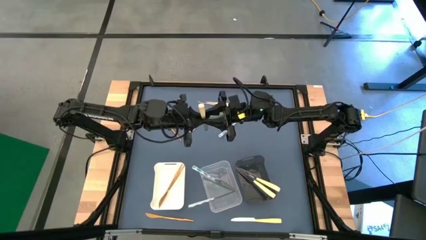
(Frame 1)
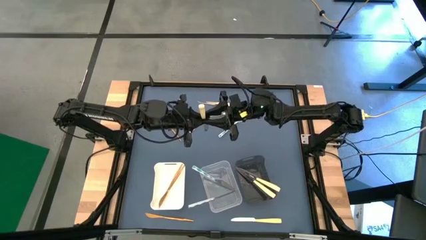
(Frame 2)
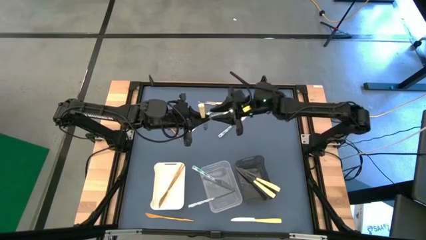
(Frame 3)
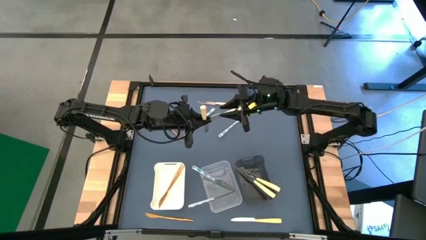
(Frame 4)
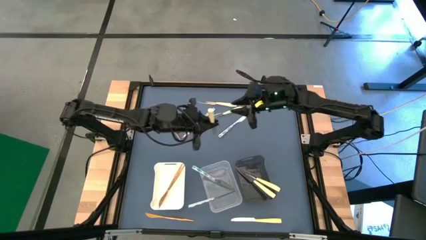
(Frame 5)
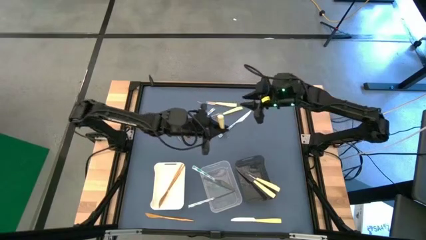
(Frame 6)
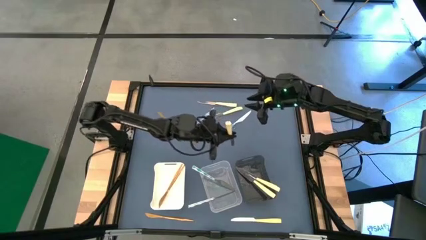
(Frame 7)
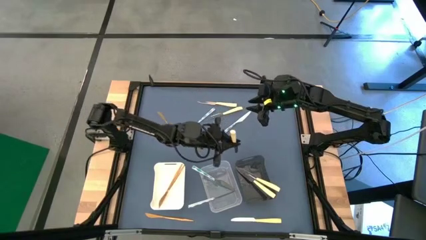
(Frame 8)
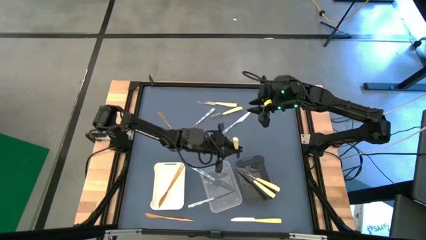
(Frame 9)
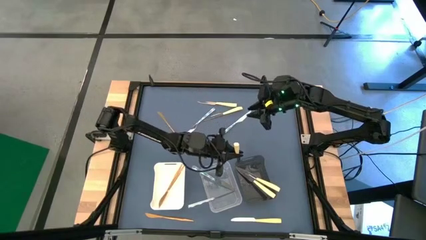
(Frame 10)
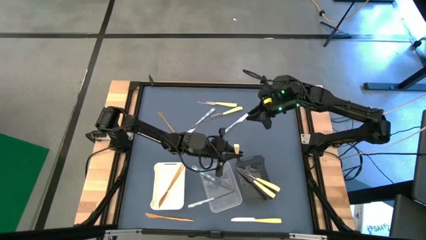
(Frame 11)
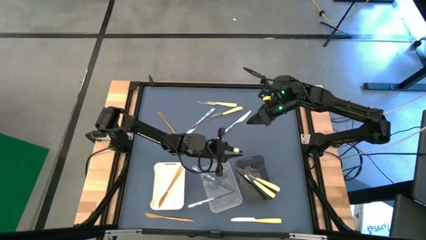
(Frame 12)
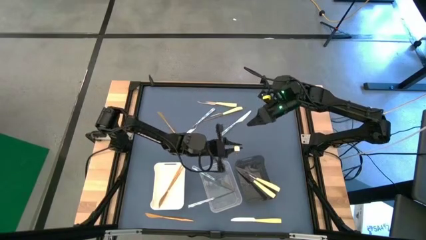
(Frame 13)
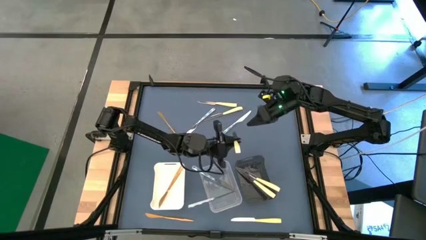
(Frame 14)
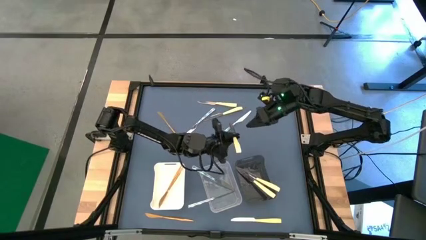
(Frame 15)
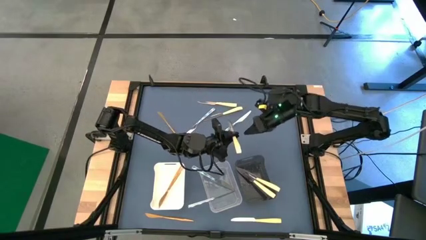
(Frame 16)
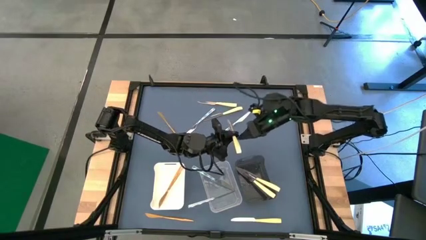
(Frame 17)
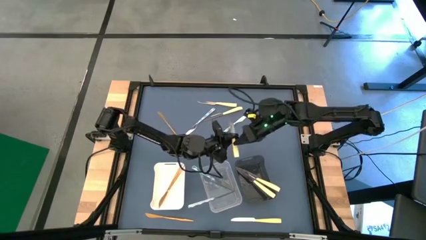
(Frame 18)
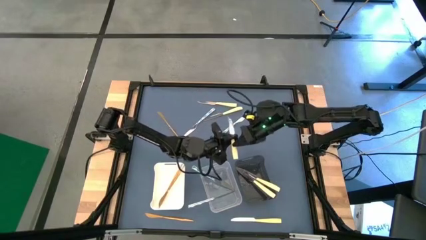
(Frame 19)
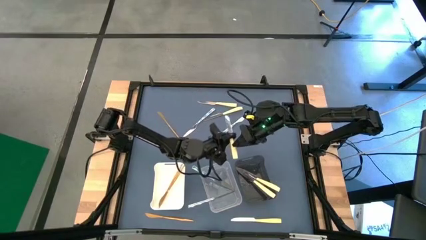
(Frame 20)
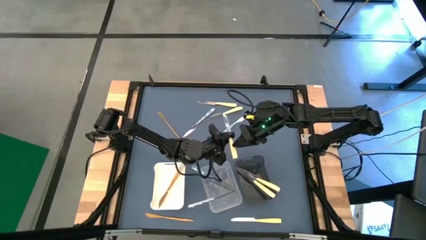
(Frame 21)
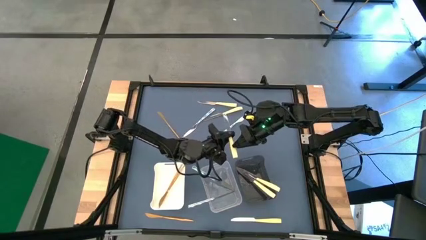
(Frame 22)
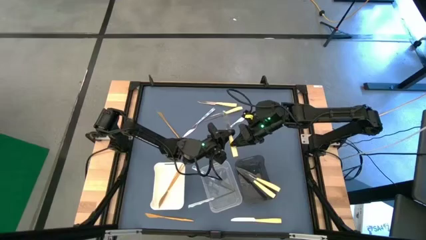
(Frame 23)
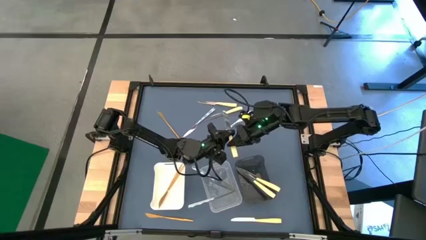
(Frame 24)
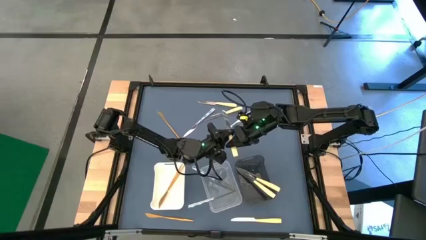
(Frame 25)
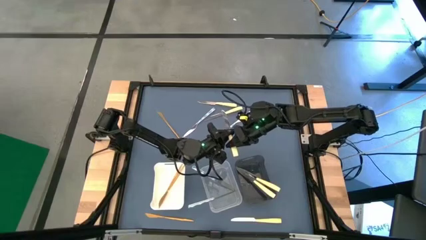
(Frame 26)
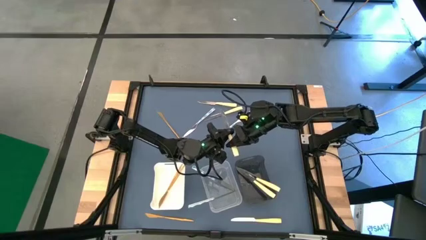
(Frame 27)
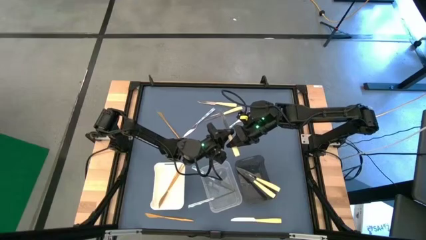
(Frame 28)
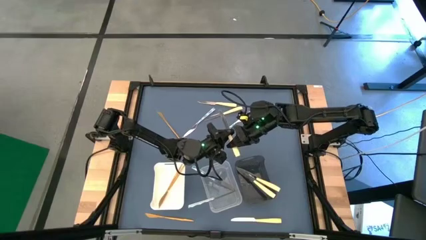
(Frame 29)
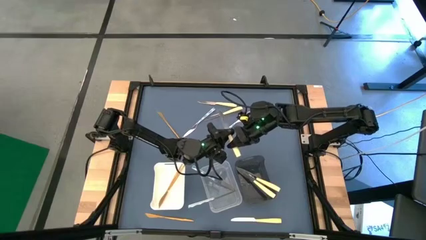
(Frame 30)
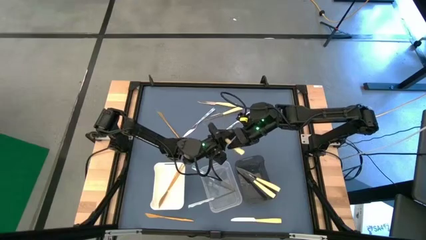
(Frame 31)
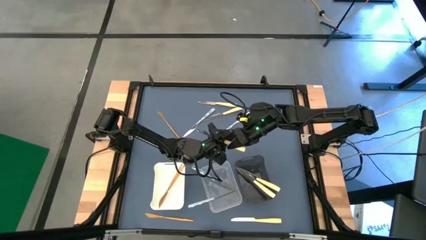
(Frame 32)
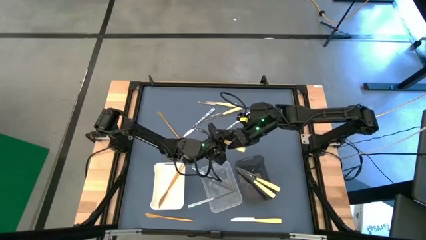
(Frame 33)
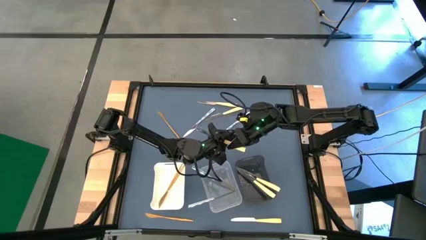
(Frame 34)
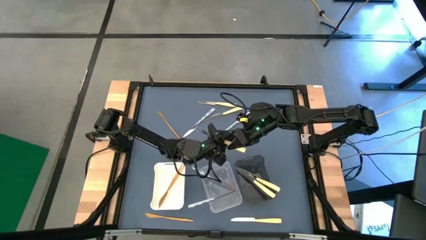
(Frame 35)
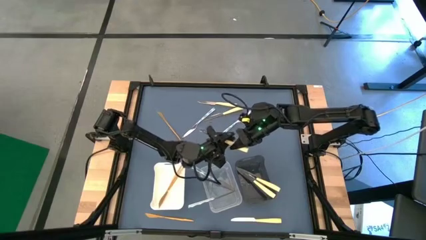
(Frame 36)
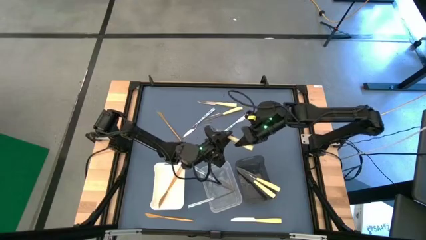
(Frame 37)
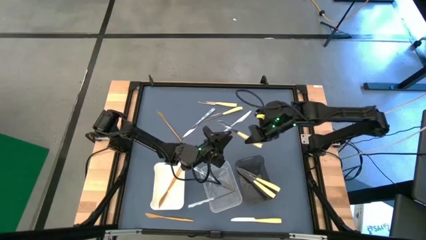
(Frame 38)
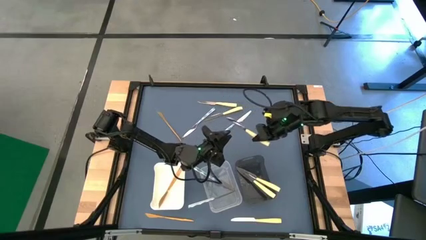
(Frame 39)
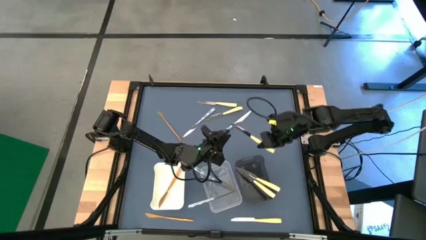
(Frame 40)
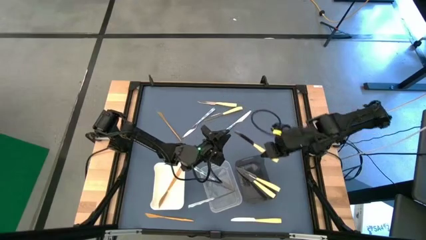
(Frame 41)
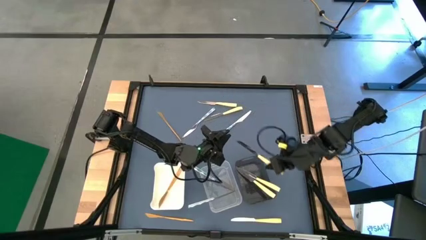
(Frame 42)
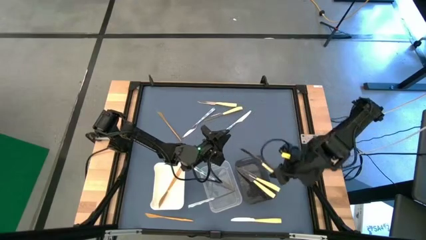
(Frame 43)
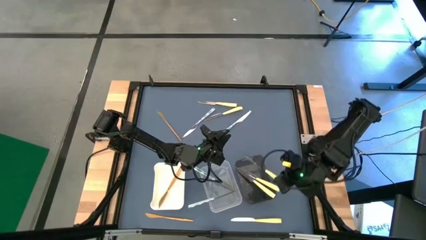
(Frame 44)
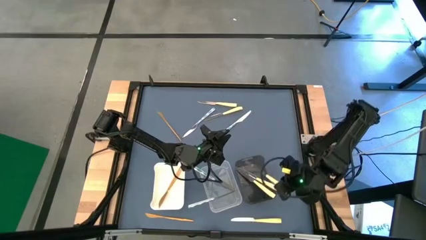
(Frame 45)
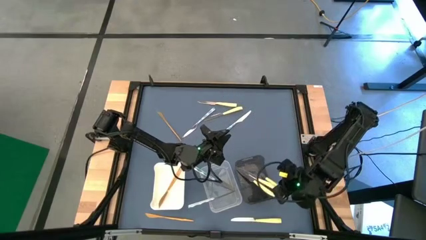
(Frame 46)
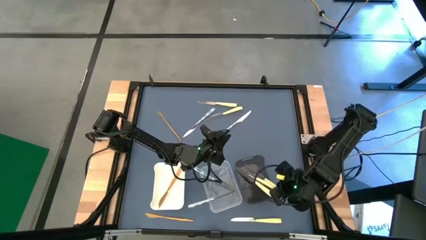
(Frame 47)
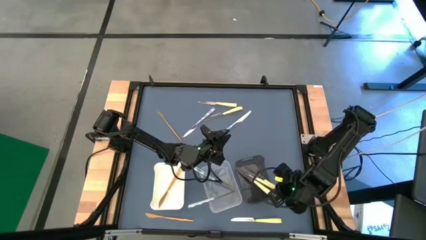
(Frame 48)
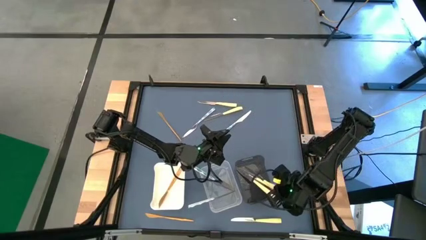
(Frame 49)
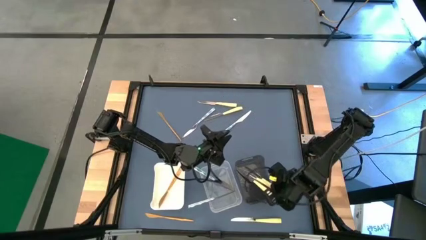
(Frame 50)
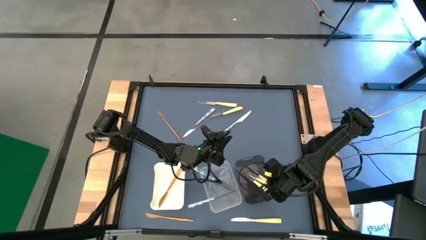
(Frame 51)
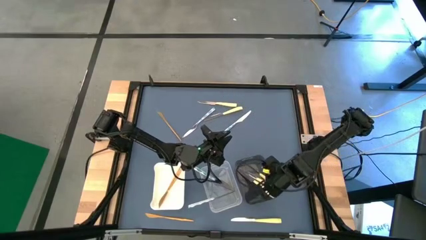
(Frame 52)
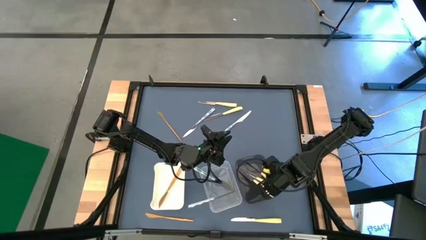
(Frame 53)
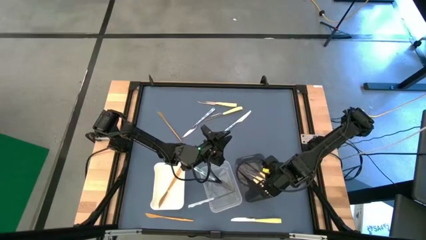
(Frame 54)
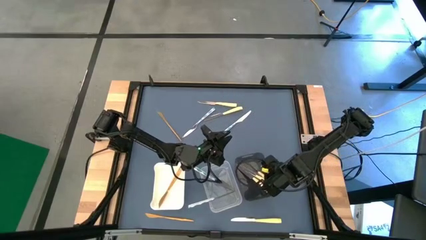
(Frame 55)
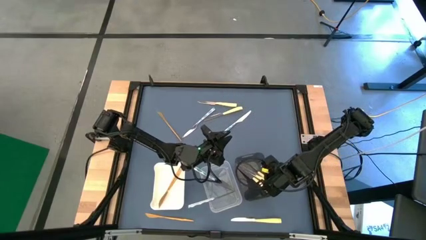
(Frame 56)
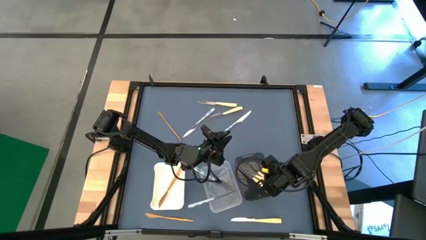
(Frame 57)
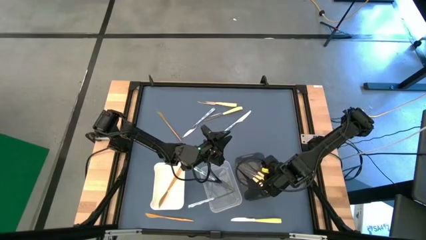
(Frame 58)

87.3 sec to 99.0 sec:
Task: Sort silverware by color (type)
Put the yellow table knife into the black transparent bin

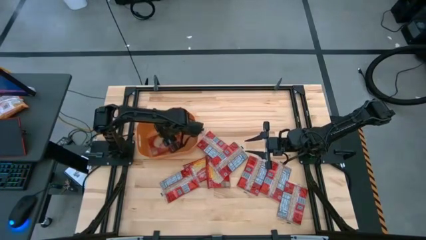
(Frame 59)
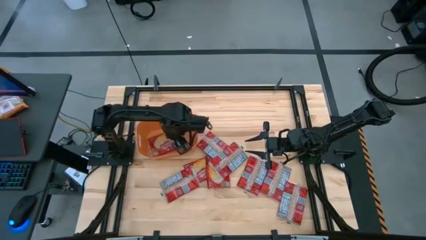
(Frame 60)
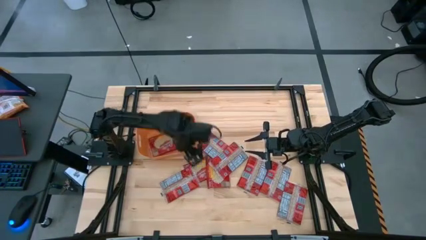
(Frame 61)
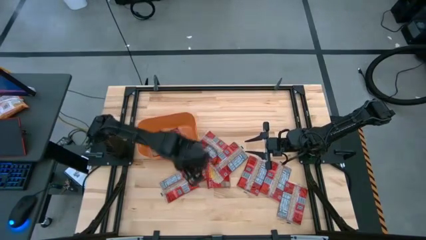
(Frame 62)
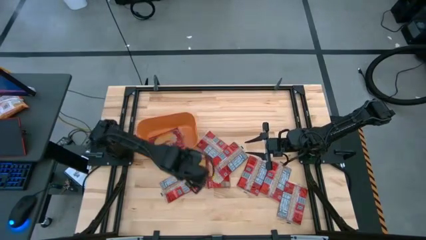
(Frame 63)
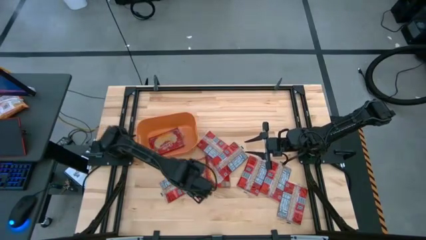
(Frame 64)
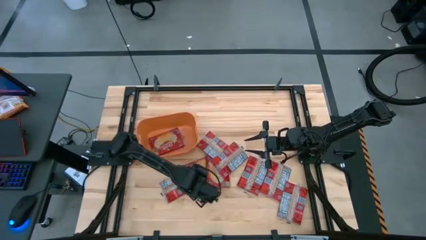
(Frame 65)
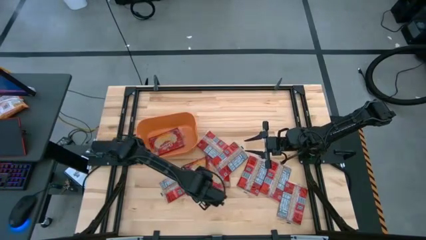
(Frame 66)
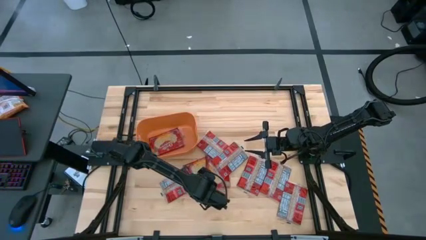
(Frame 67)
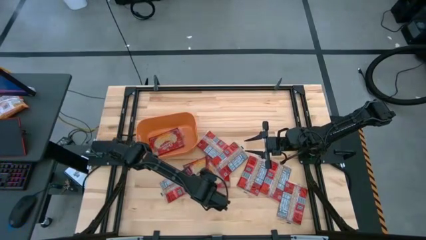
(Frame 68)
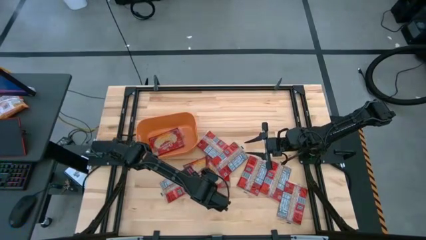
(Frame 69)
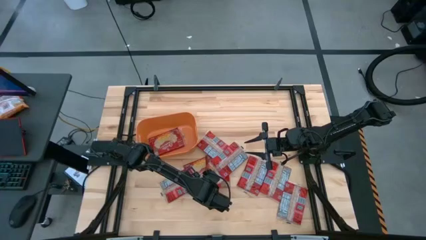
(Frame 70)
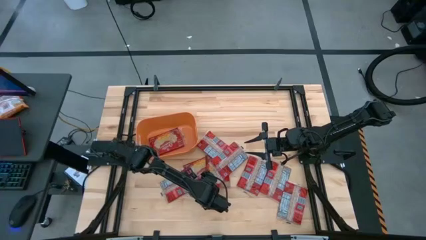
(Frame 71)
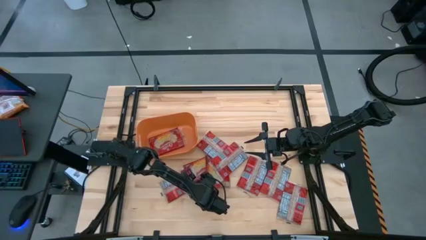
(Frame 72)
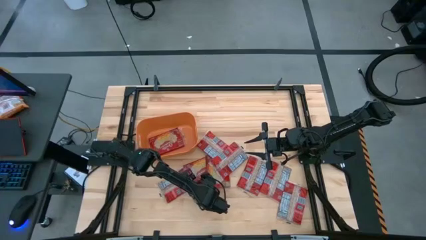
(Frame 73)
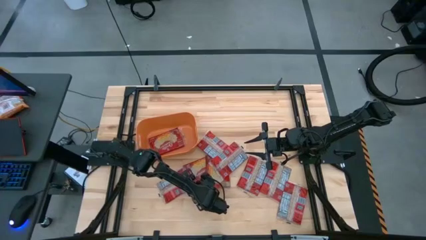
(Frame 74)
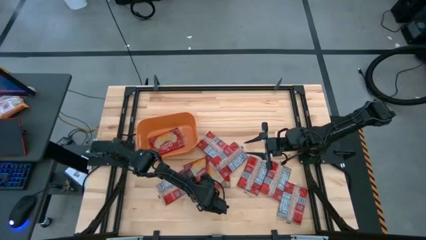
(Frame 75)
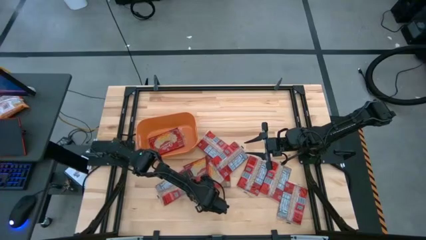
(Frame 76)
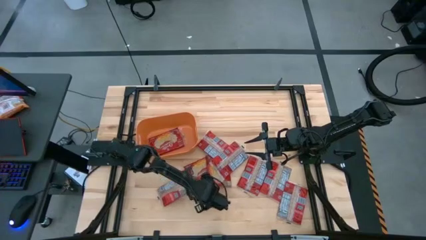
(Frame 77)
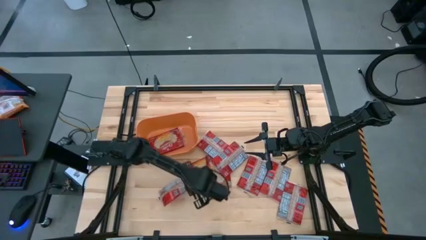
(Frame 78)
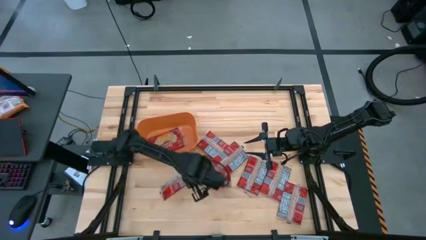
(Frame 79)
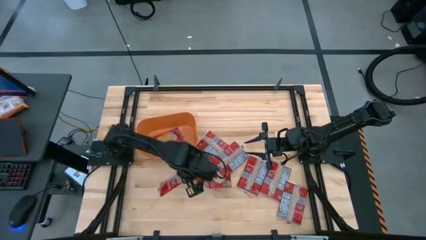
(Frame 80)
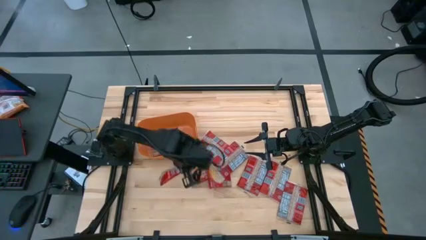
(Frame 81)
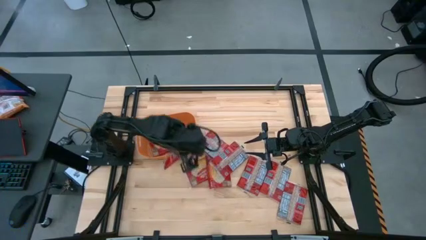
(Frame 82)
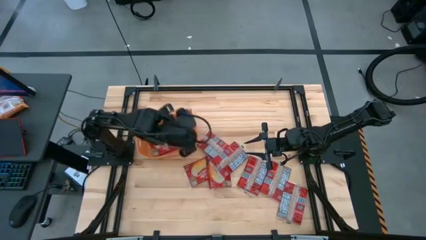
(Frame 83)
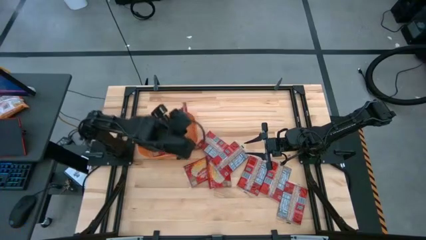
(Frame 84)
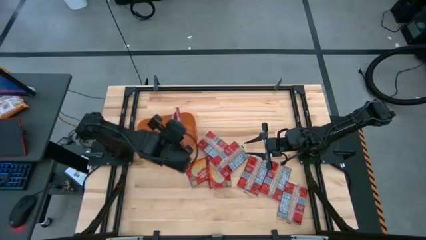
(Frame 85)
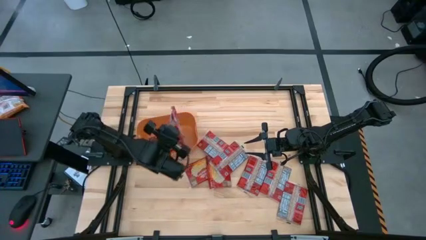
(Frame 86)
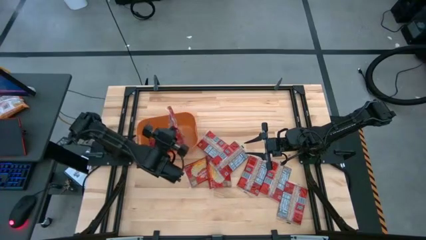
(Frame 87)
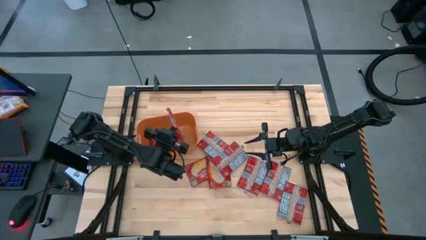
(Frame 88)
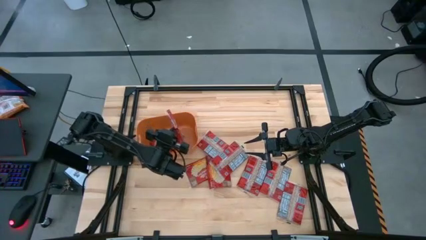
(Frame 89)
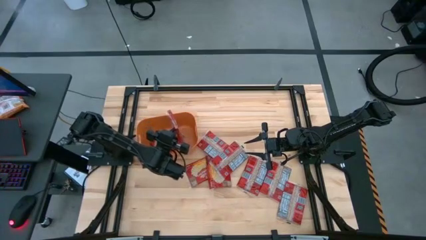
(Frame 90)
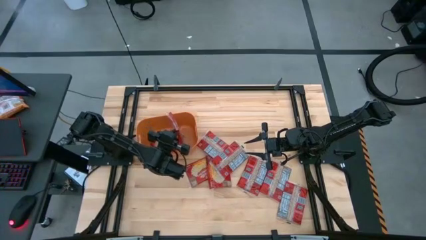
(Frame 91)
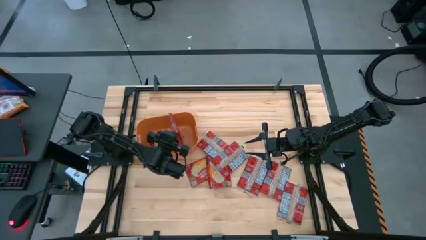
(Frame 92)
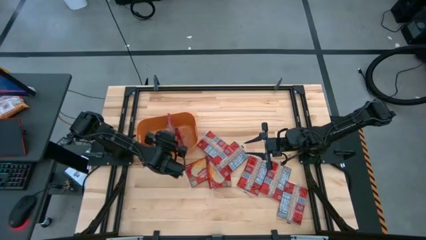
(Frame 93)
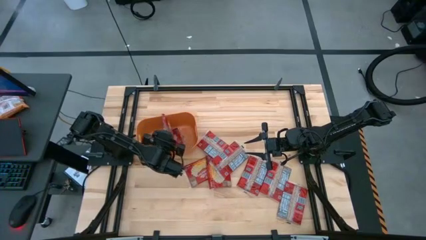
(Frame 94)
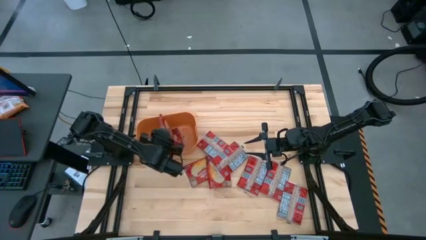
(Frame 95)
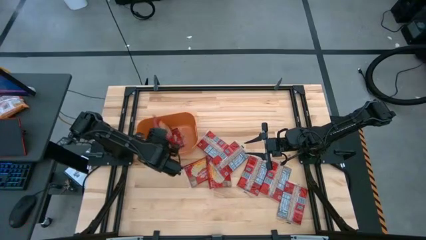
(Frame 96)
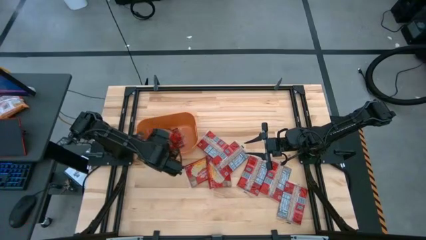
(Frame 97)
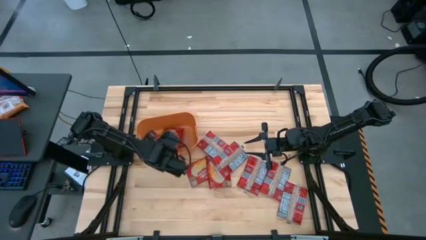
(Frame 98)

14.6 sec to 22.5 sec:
Task: Sort popcorn bags into baskets
Put the red popcorn bag into the orange bin
